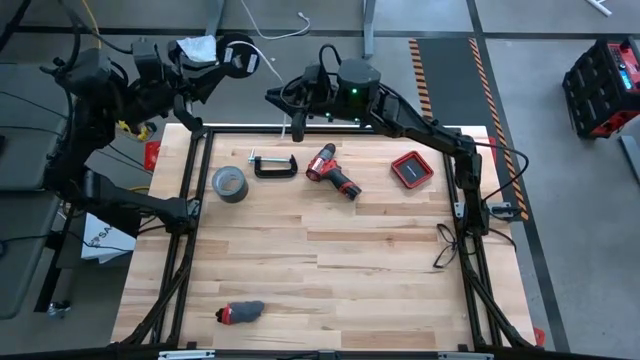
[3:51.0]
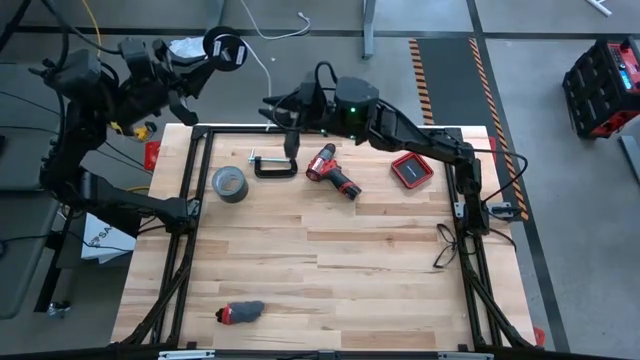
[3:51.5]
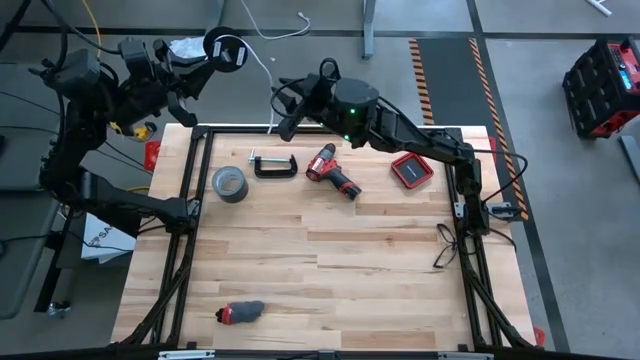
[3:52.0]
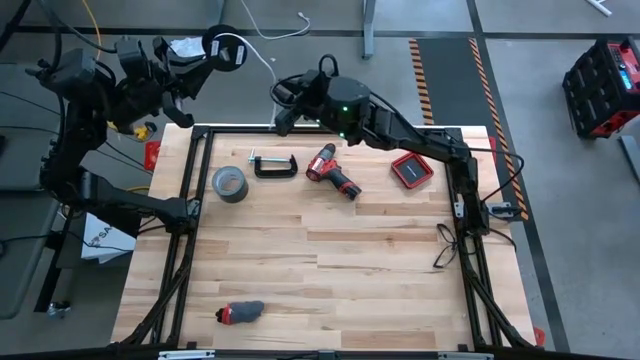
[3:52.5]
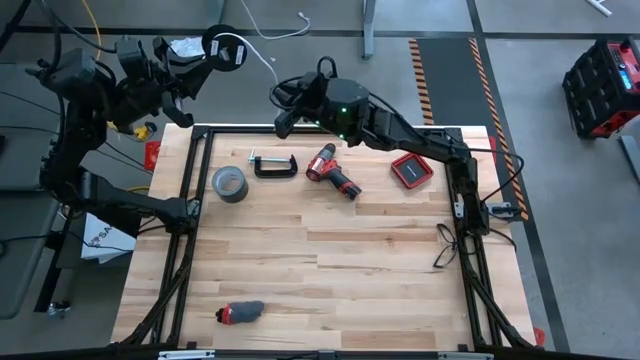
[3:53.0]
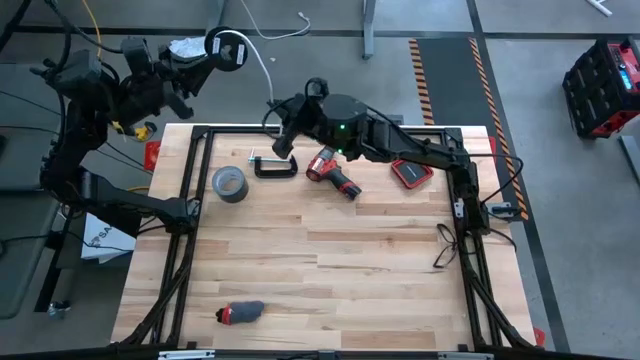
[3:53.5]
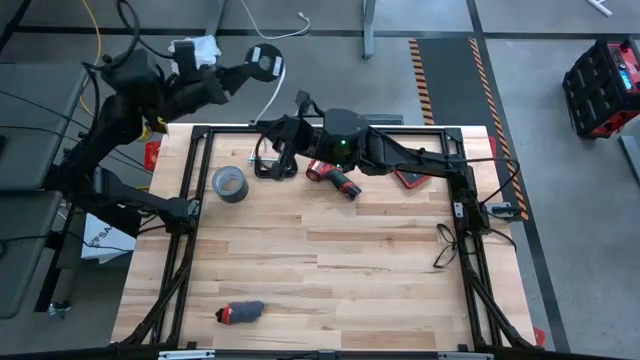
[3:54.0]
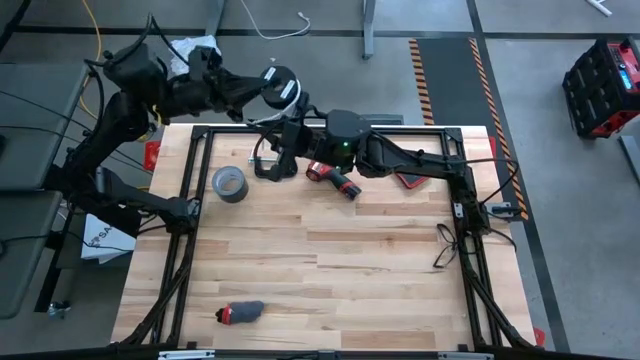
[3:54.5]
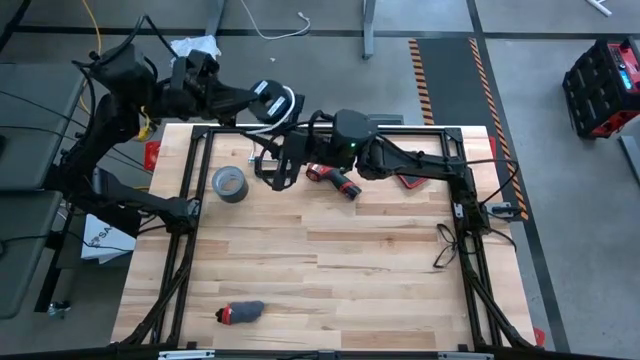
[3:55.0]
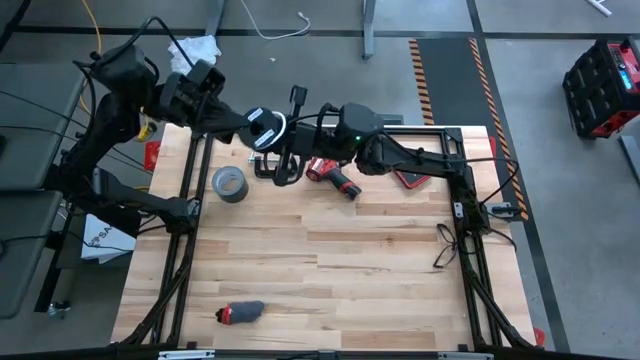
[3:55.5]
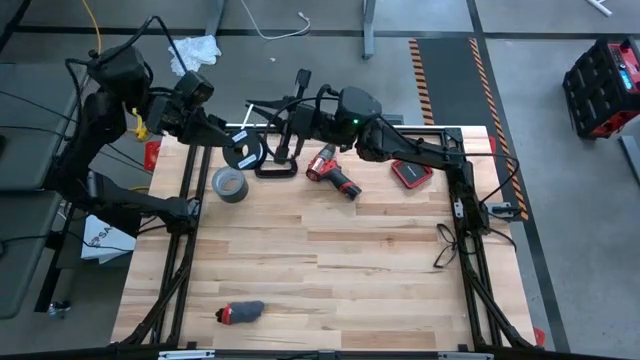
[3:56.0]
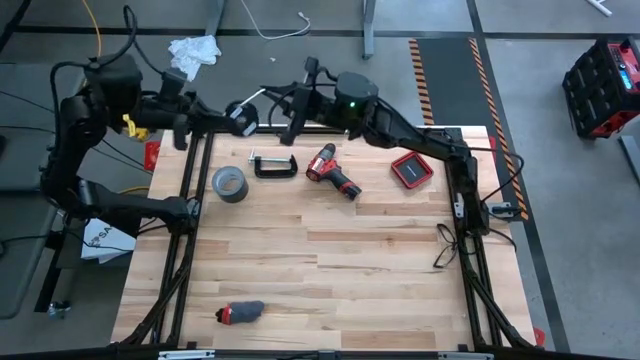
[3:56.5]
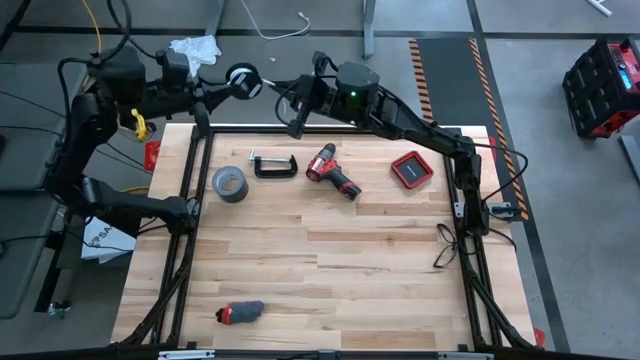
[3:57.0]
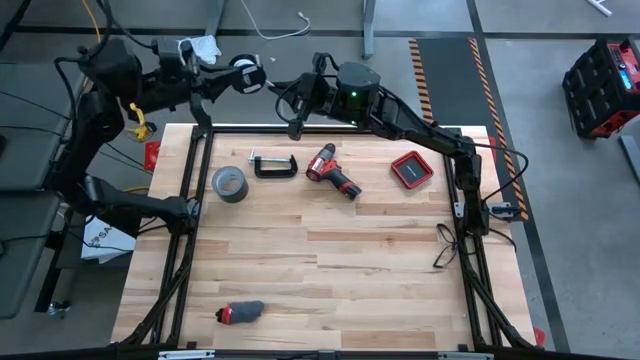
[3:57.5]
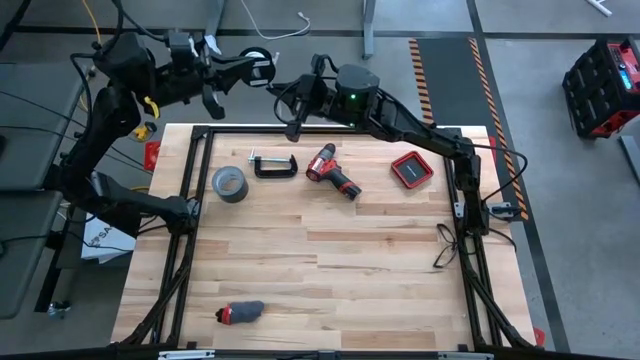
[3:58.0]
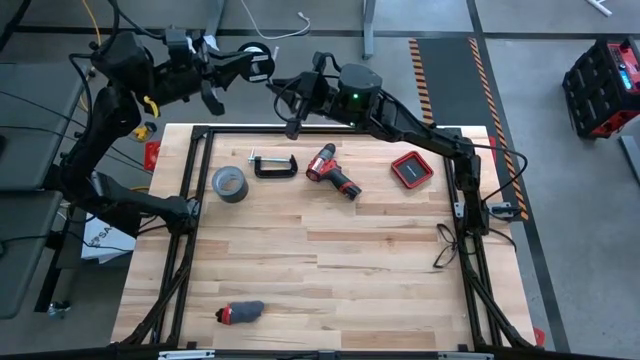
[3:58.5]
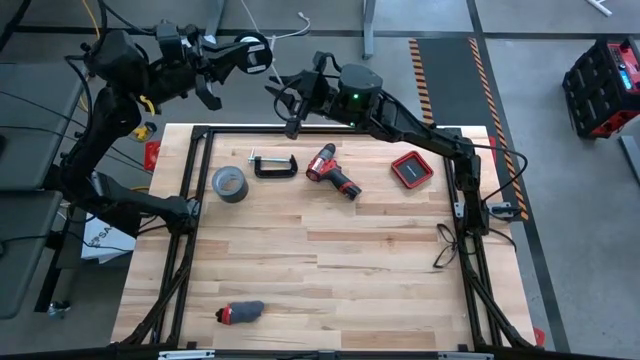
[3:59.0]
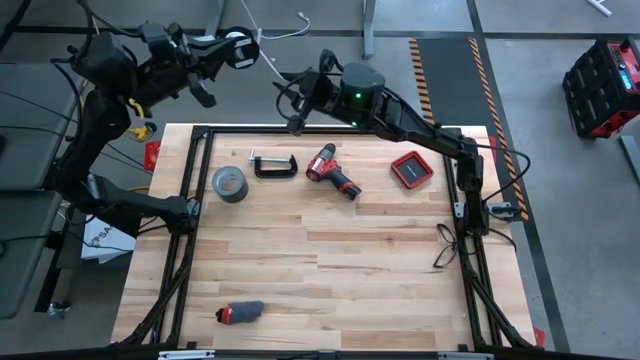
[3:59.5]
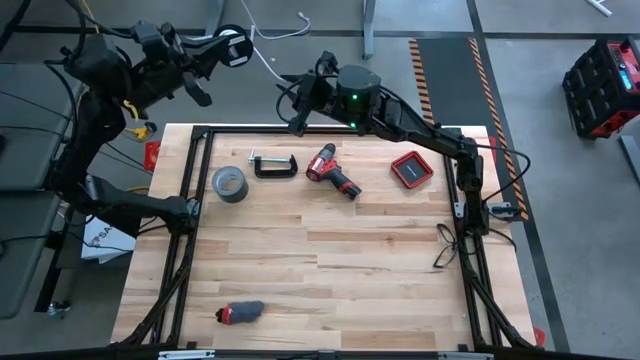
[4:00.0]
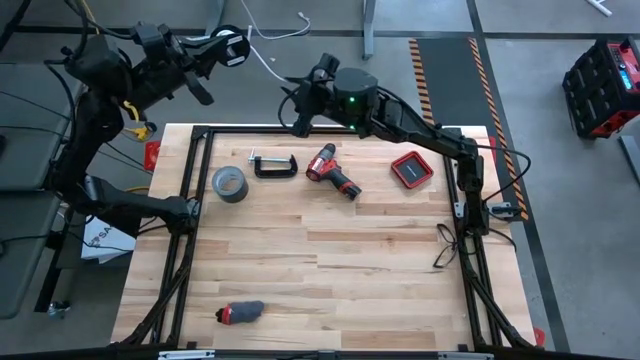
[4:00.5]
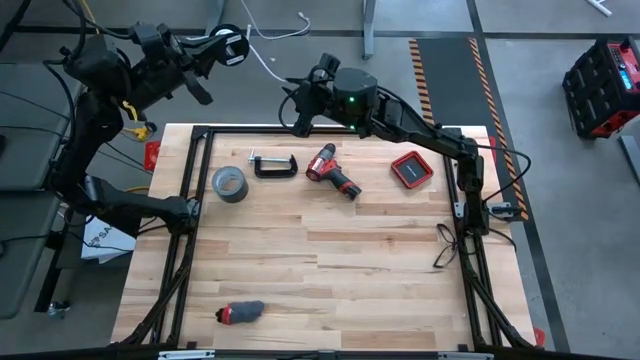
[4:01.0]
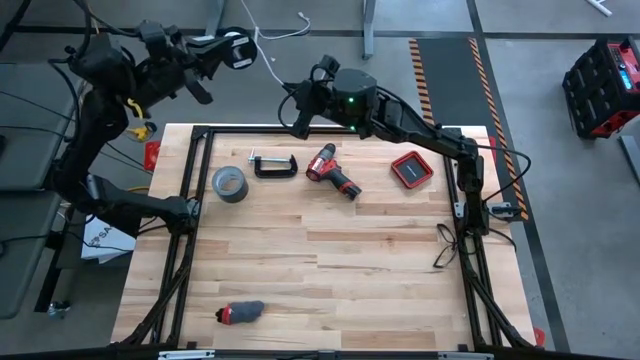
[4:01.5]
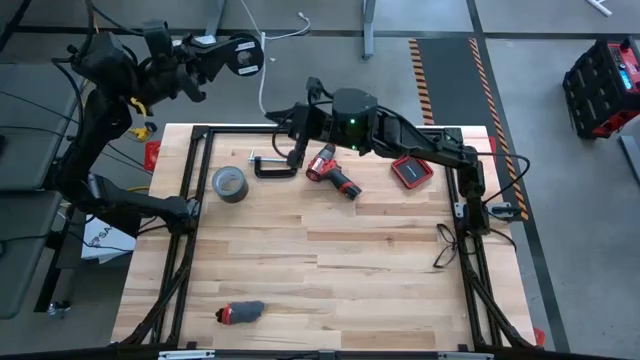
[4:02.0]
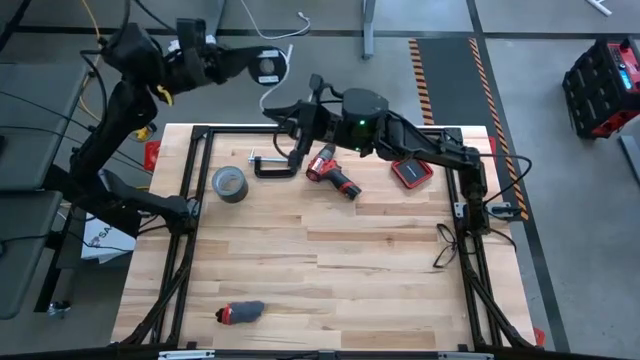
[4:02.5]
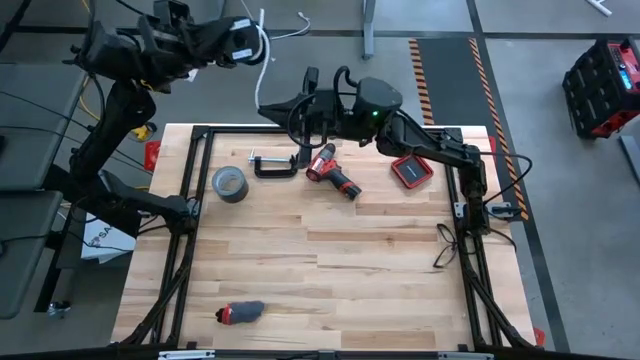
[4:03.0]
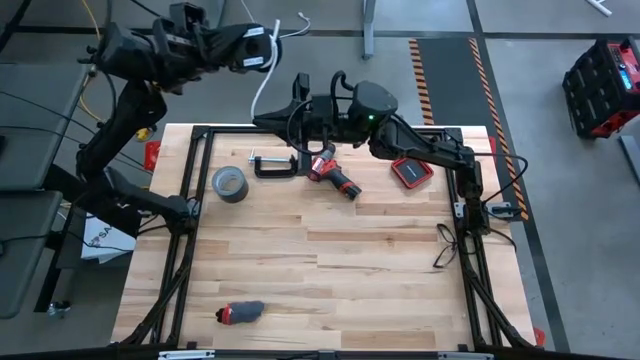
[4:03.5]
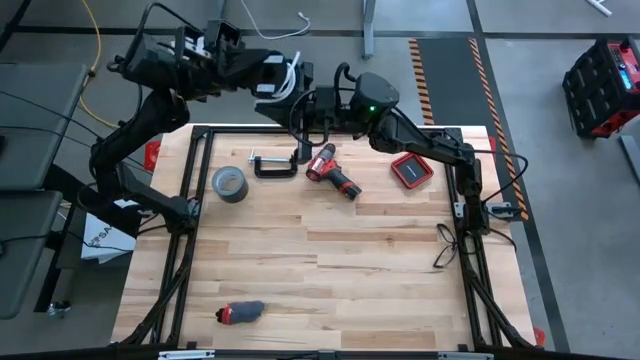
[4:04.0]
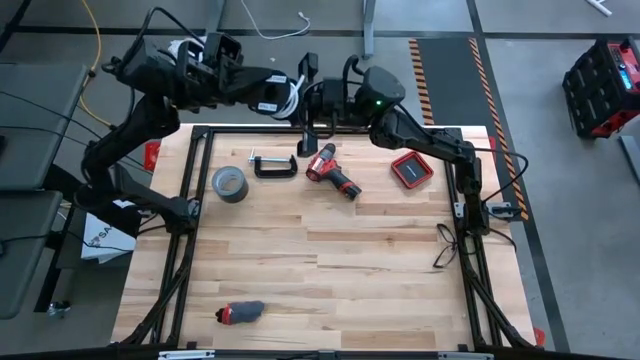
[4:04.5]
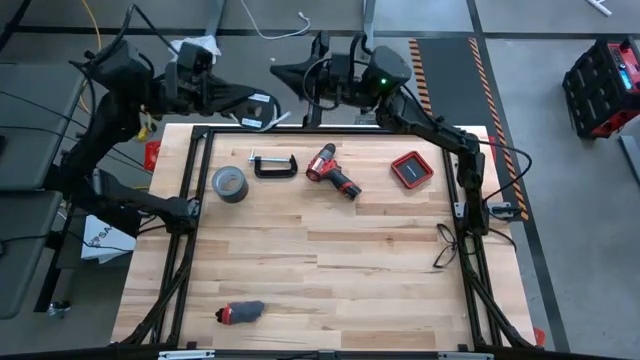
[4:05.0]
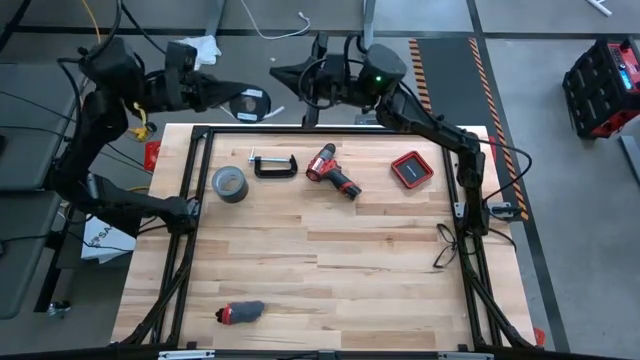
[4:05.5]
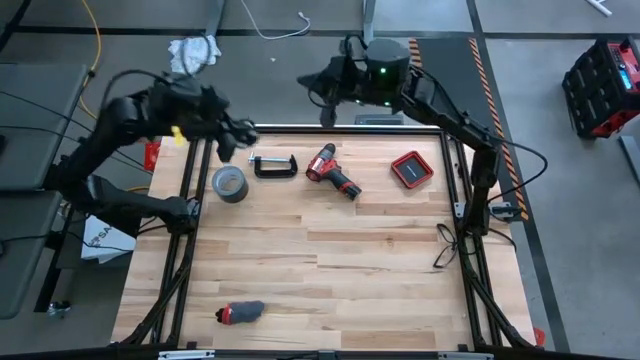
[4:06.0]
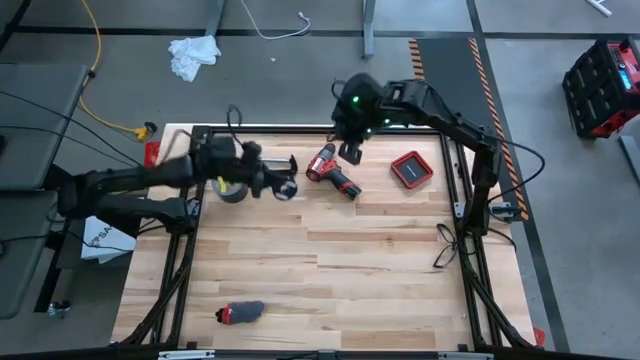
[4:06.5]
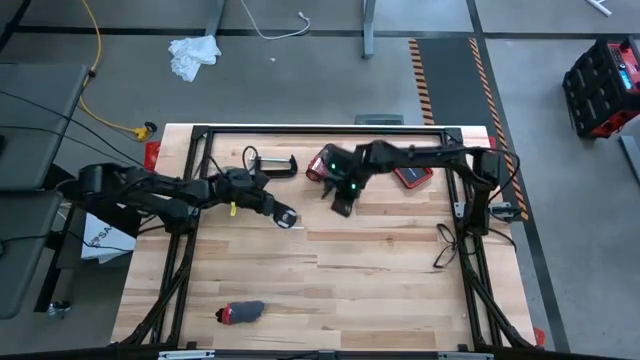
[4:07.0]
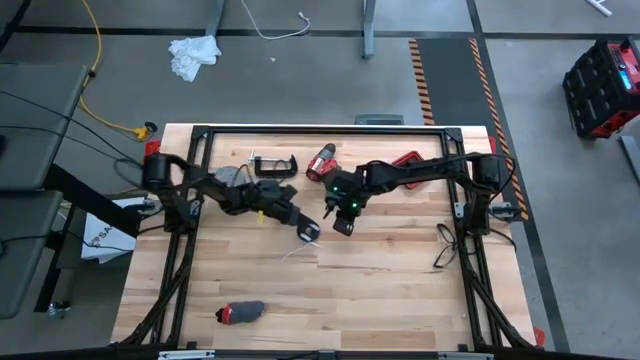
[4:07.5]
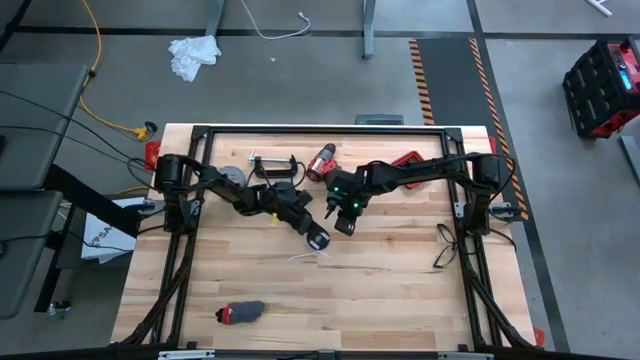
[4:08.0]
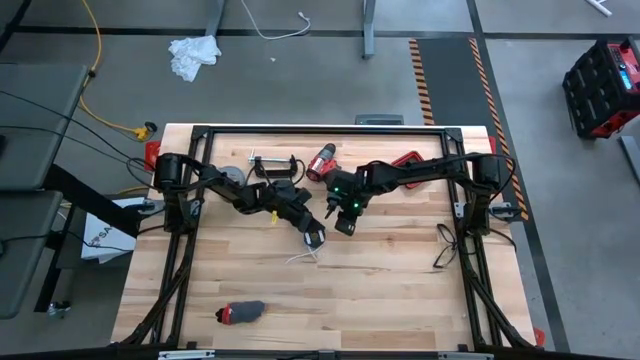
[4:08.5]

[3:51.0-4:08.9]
Task: Coil cords
Coil the white cable wire into the black spool

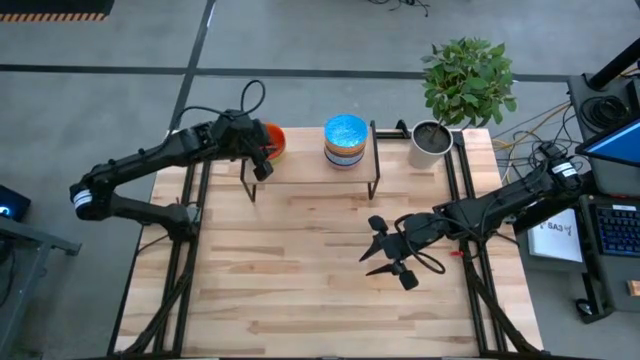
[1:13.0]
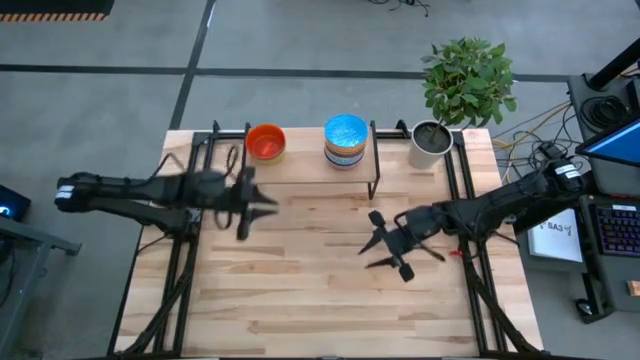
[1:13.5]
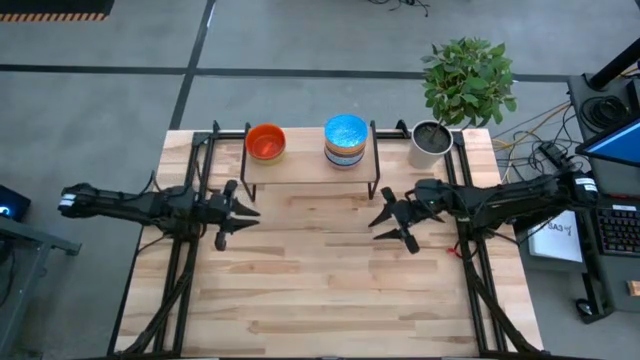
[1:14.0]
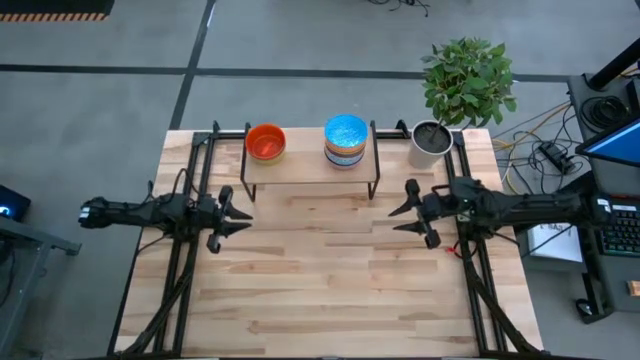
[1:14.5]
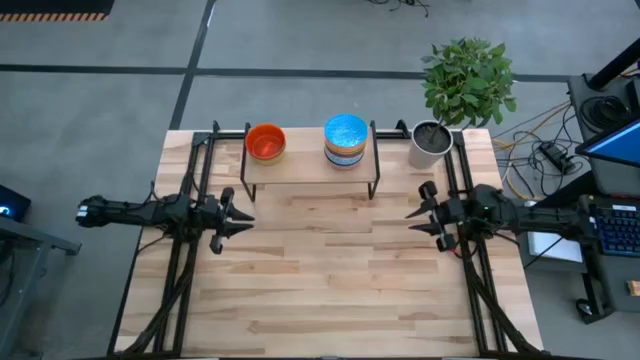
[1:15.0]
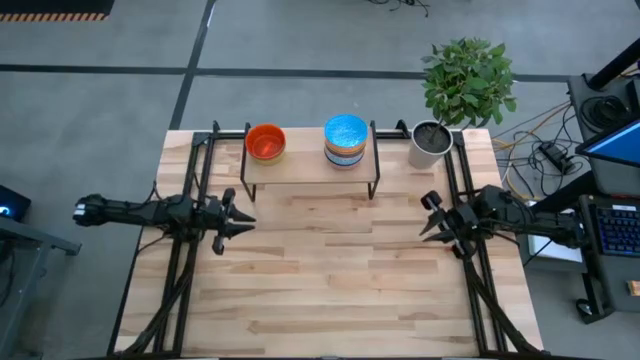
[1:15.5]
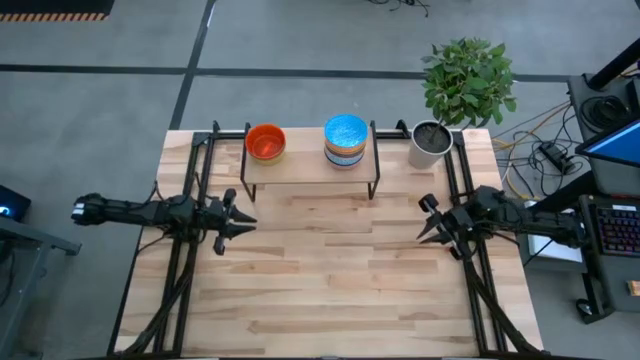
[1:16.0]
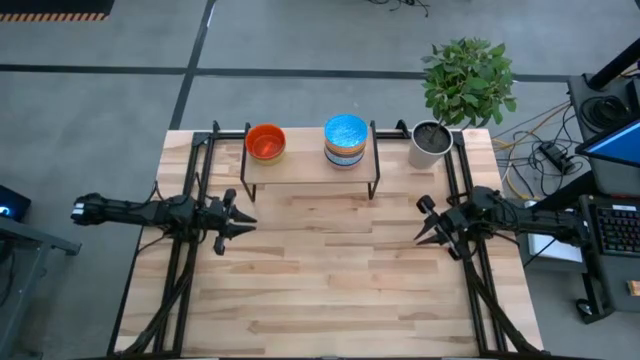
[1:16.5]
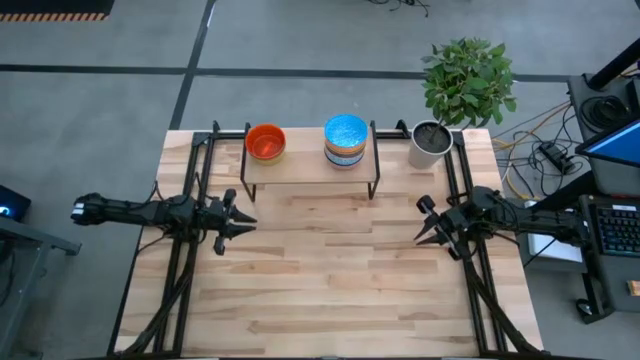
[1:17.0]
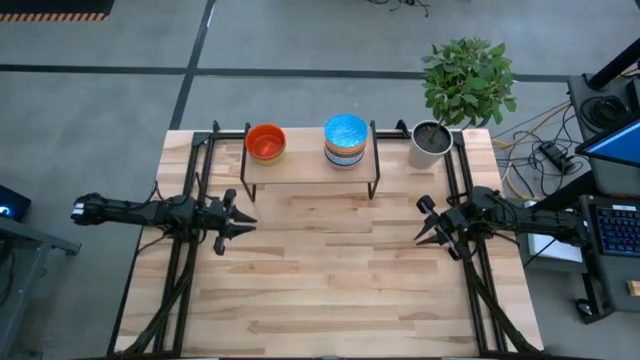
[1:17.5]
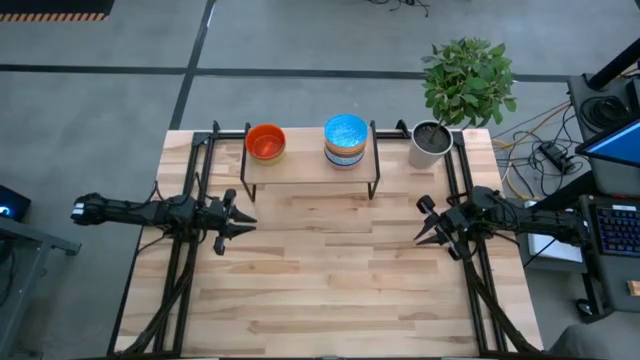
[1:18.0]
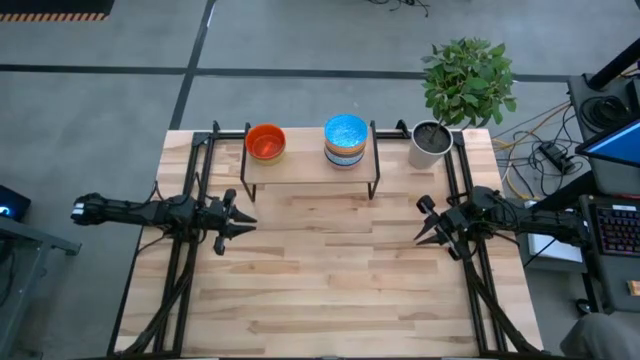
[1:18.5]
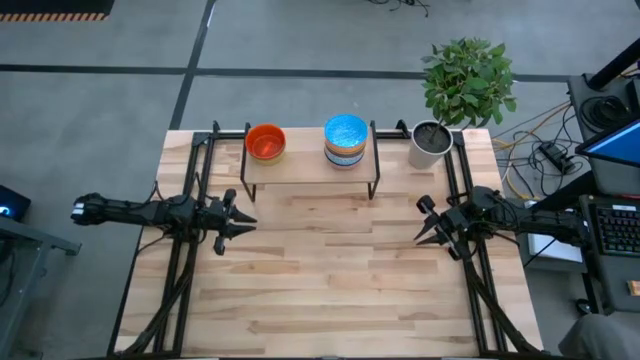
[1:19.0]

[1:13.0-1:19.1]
Task: Place and stack bowls onto a shelf
Return to Home Position
